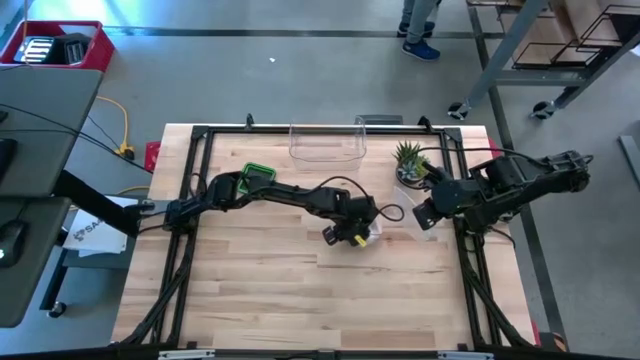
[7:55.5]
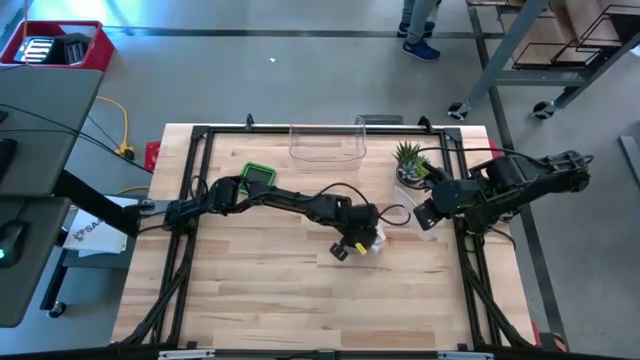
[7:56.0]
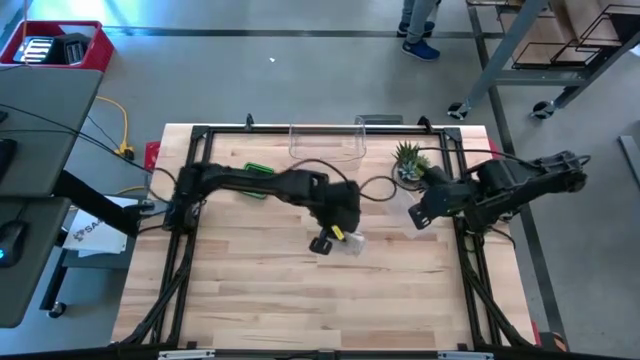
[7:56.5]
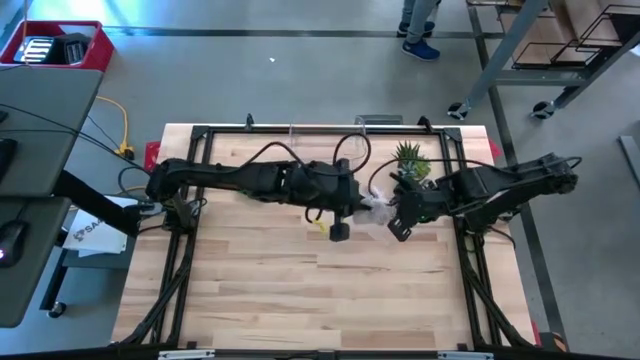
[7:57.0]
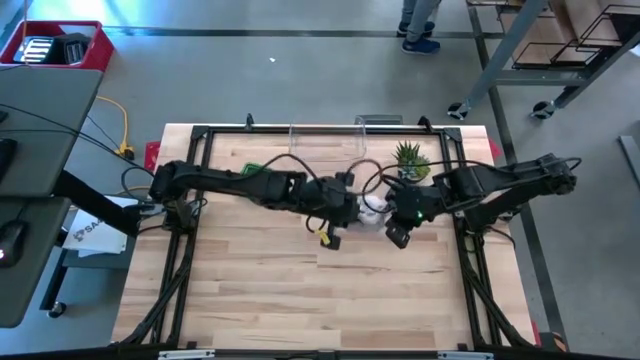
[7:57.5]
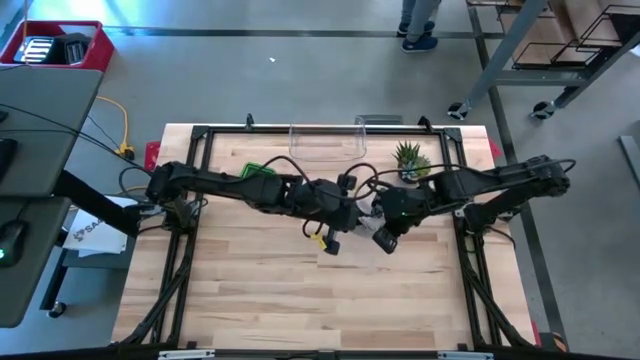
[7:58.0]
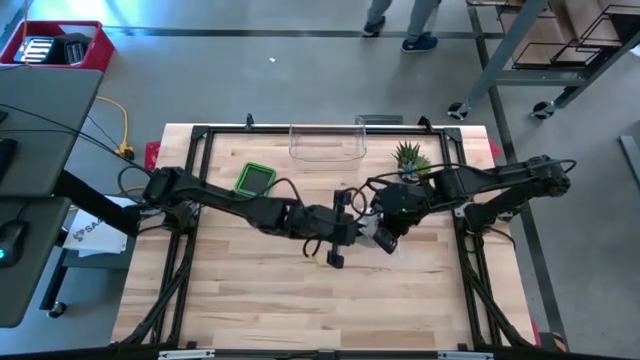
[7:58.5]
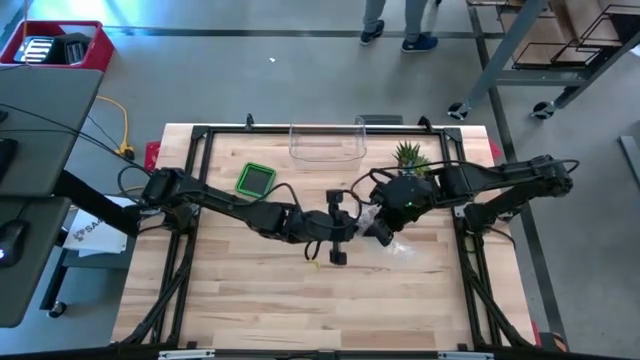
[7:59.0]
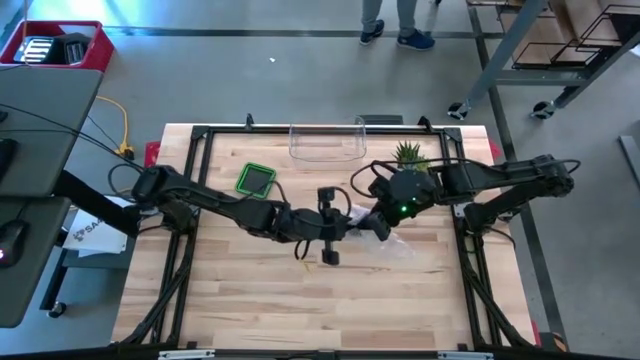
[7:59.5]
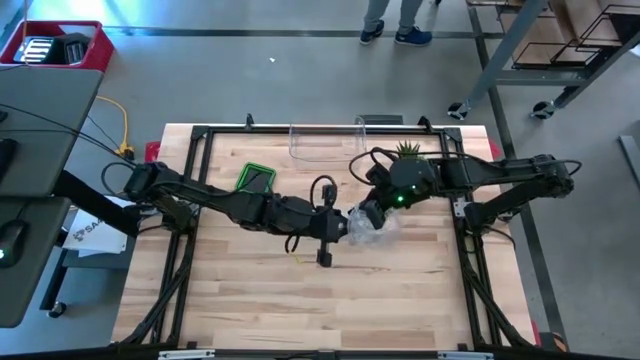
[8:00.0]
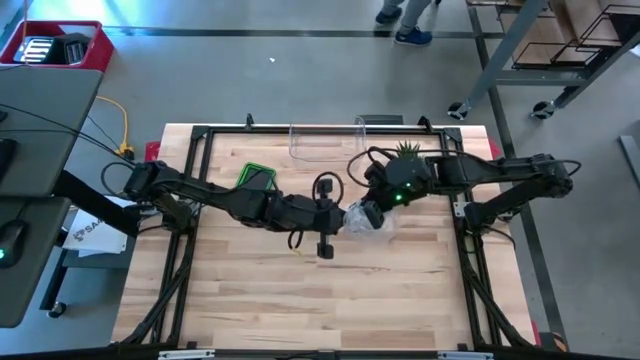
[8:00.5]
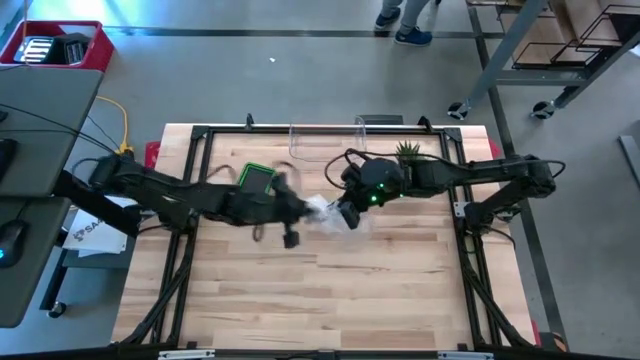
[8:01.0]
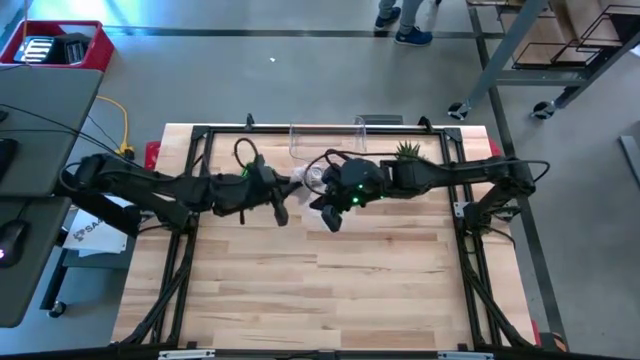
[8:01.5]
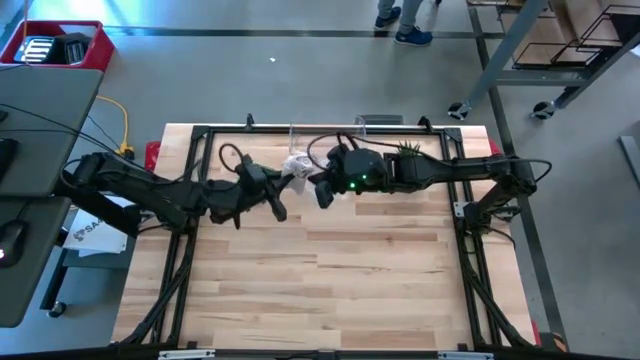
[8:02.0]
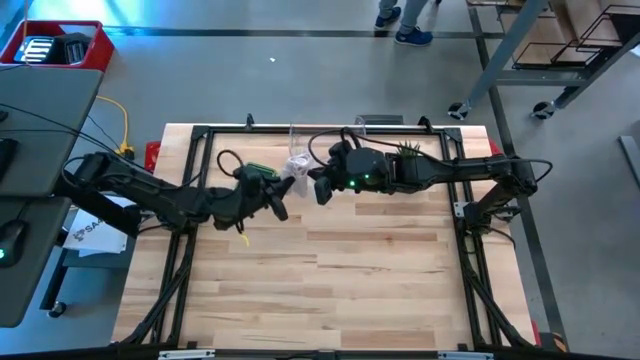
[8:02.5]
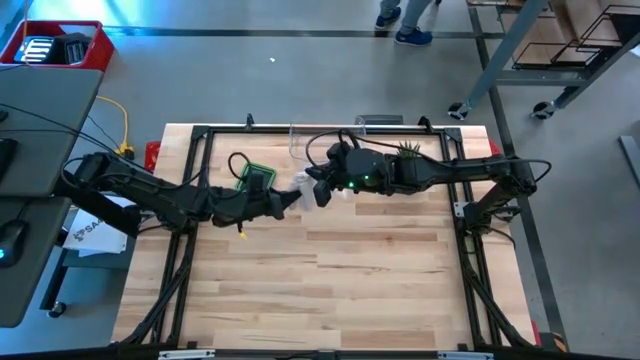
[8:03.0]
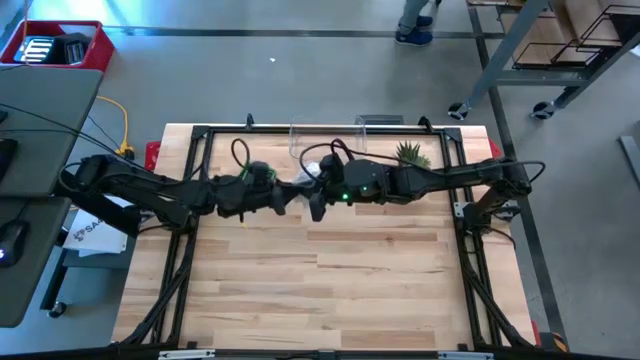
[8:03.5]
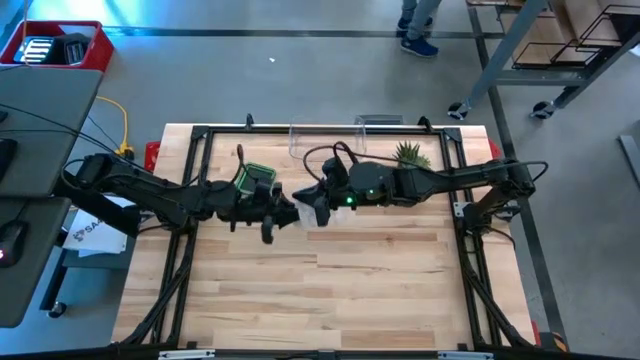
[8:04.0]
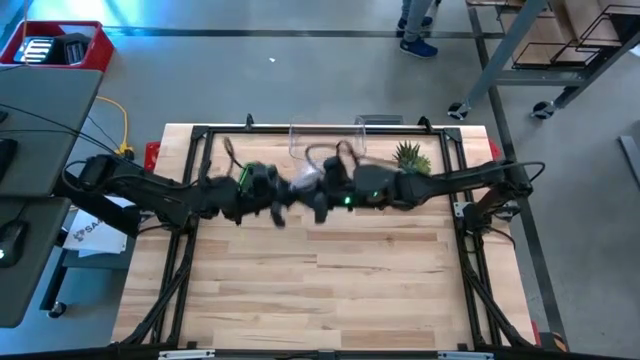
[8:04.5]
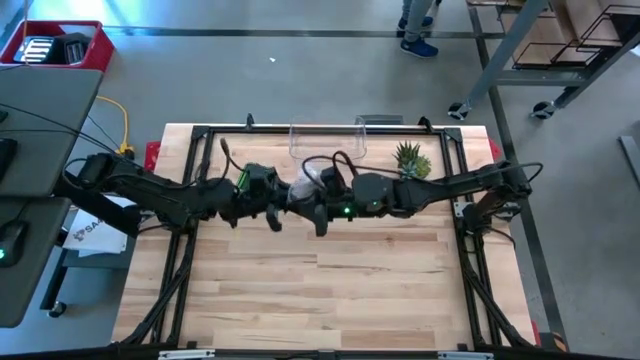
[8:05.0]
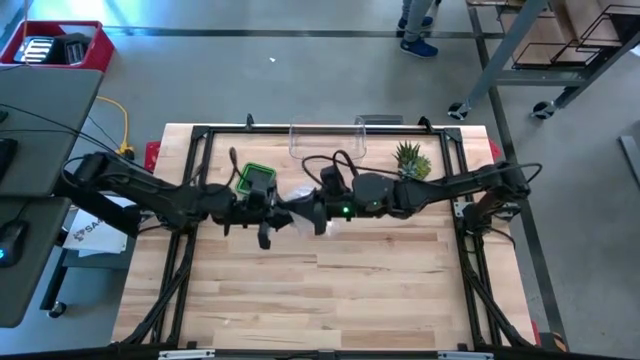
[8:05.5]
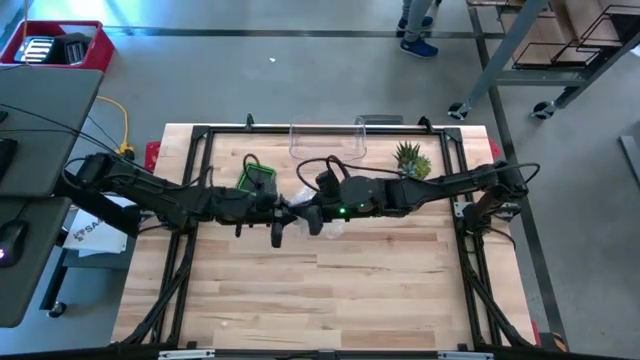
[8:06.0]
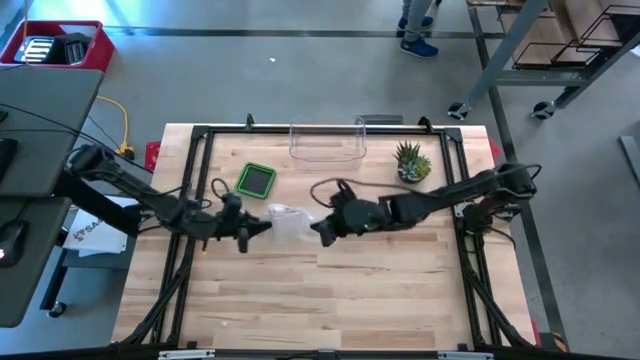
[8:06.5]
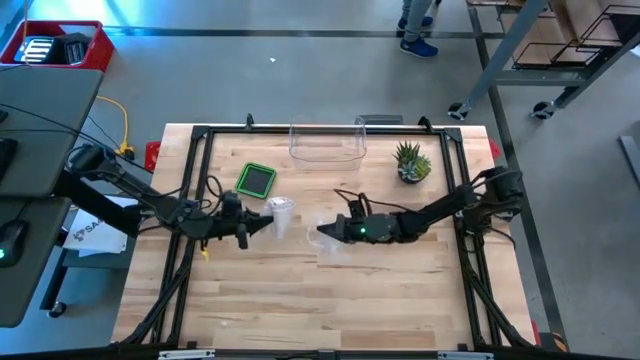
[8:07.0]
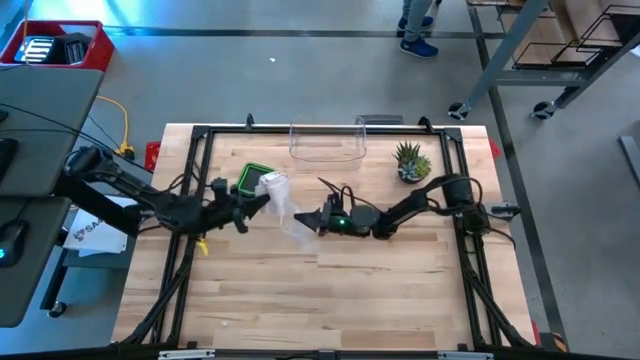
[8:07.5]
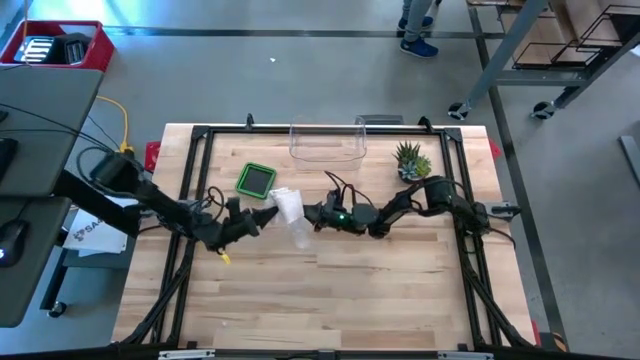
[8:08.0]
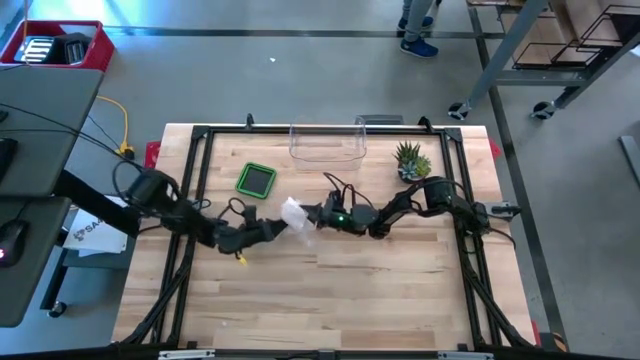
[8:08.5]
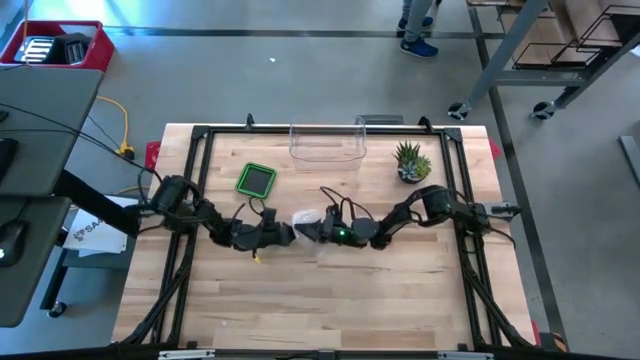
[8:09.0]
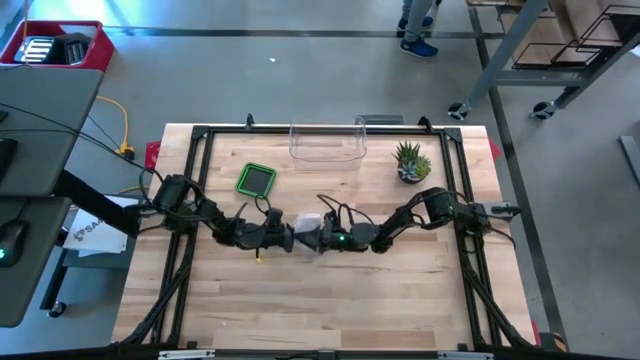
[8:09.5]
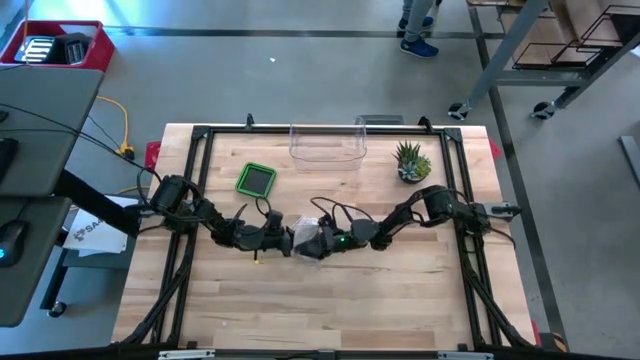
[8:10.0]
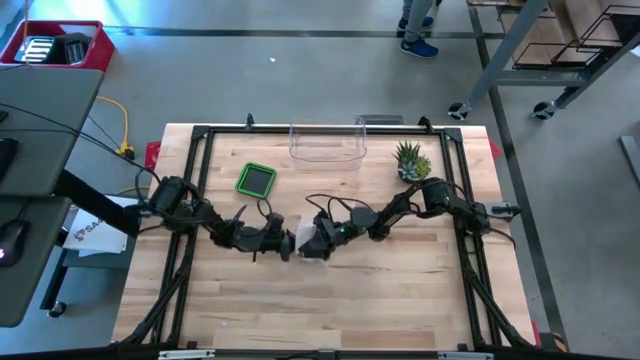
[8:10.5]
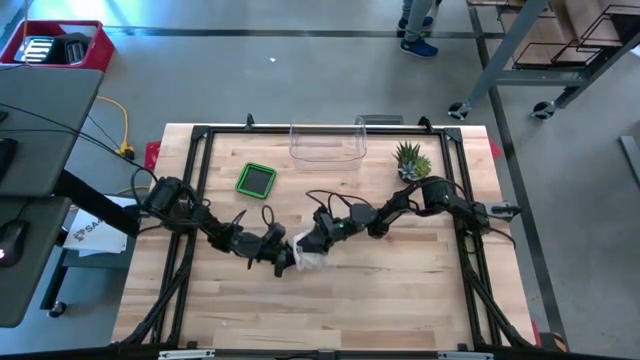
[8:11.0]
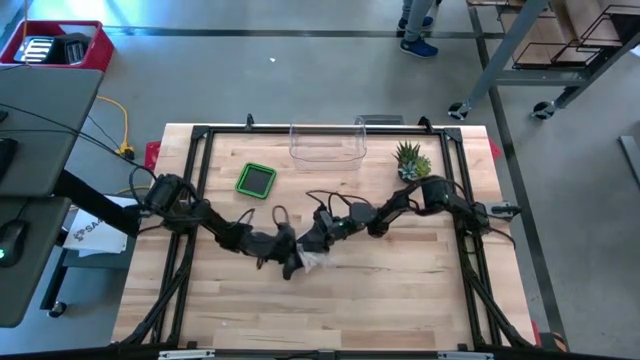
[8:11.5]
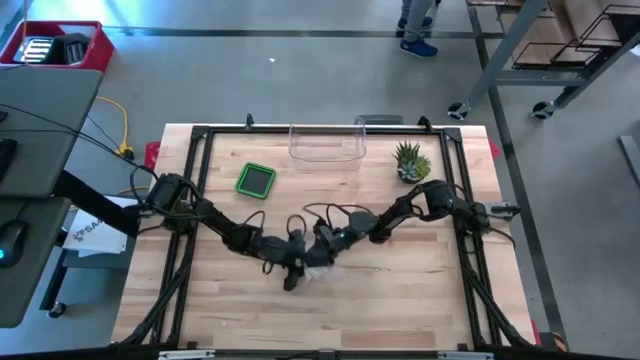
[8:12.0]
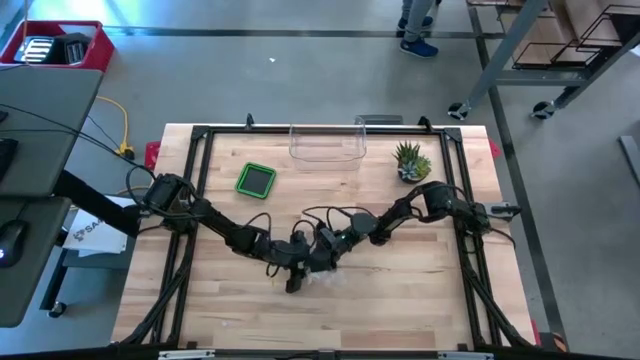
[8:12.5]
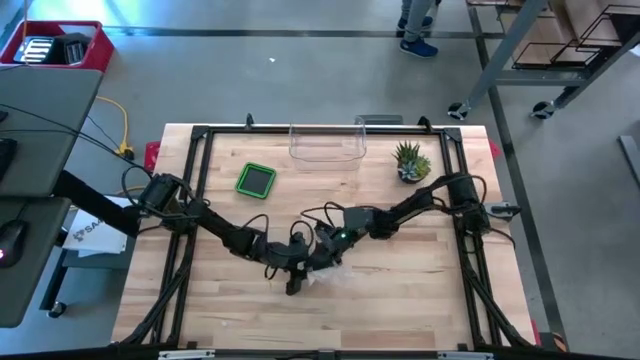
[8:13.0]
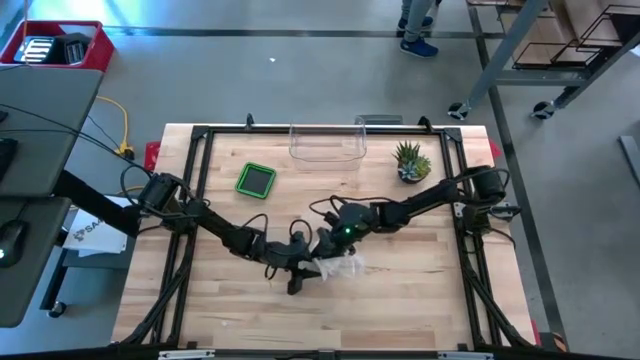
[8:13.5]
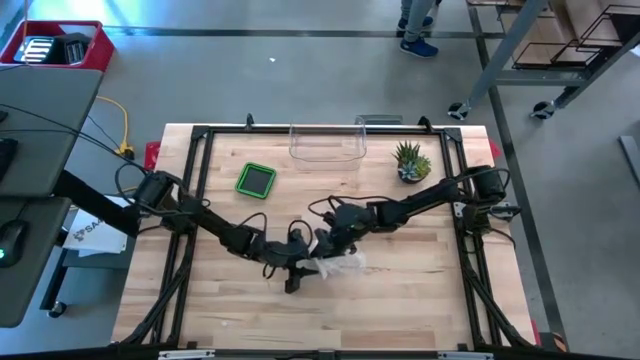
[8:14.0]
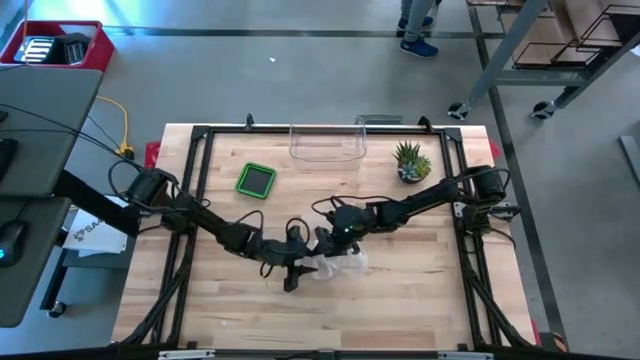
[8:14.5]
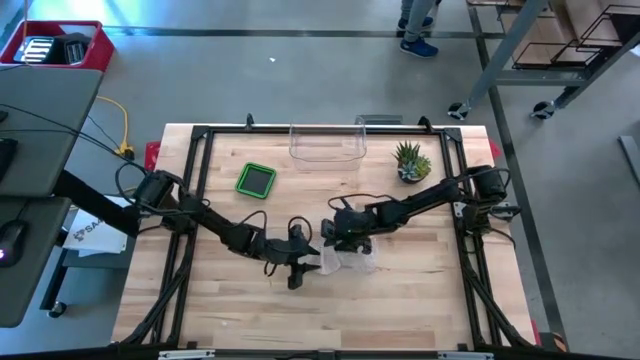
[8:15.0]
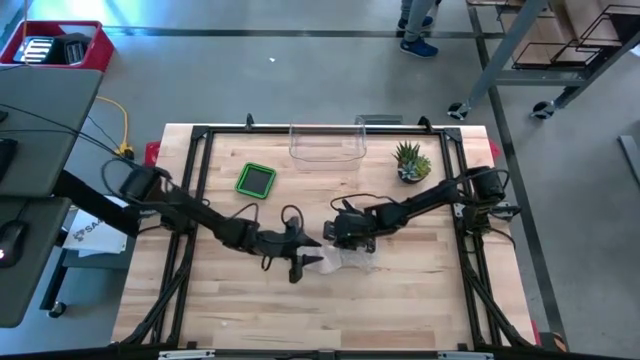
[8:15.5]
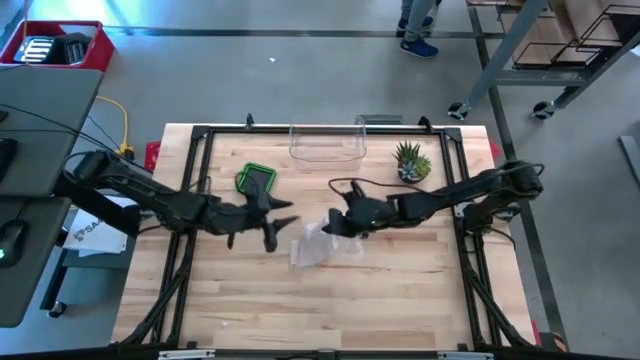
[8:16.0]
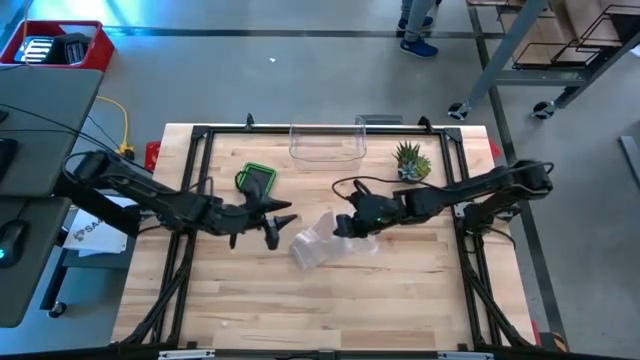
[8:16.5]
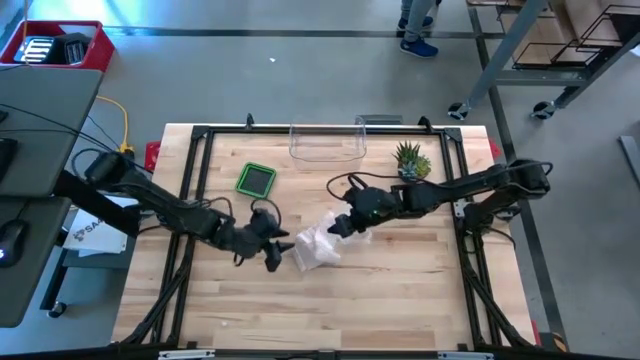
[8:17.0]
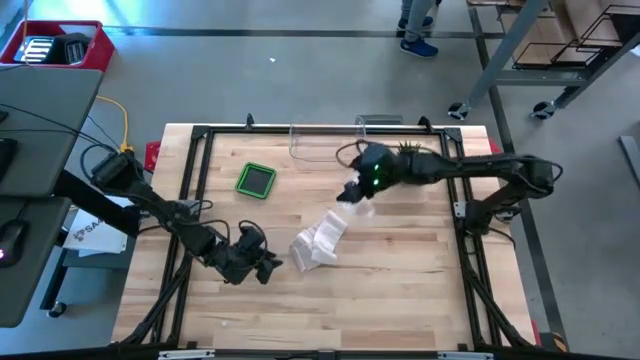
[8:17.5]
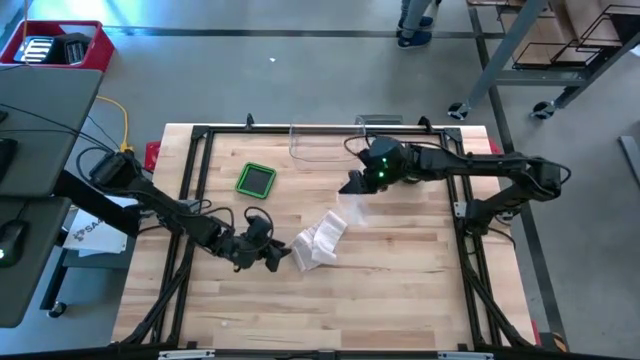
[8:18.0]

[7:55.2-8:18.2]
Task: Roll bandage
Put the rolled bandage into the transparent zip bag
